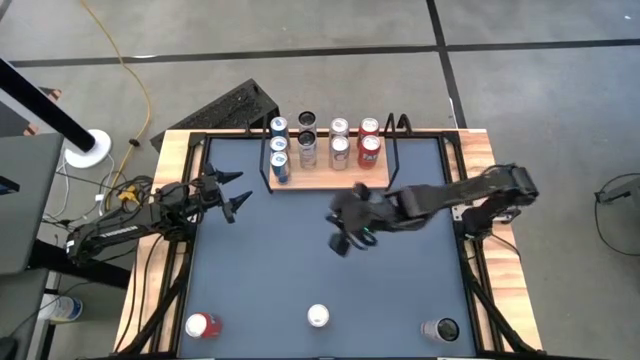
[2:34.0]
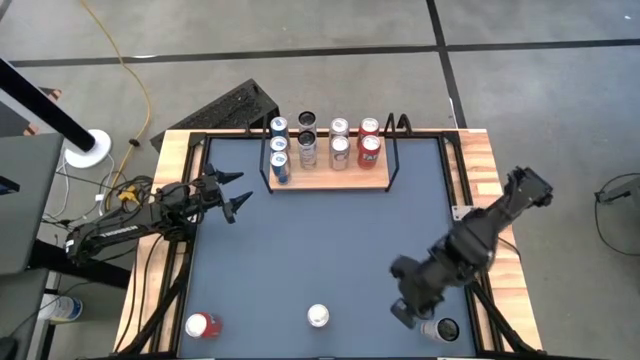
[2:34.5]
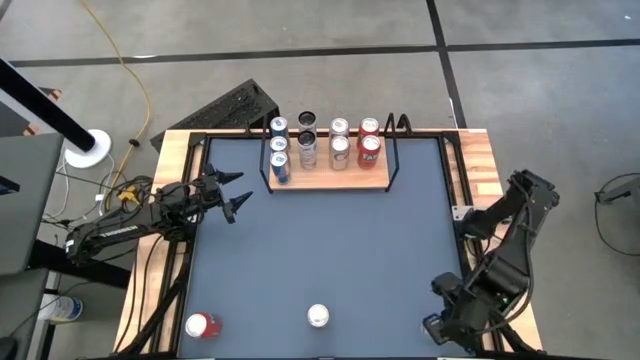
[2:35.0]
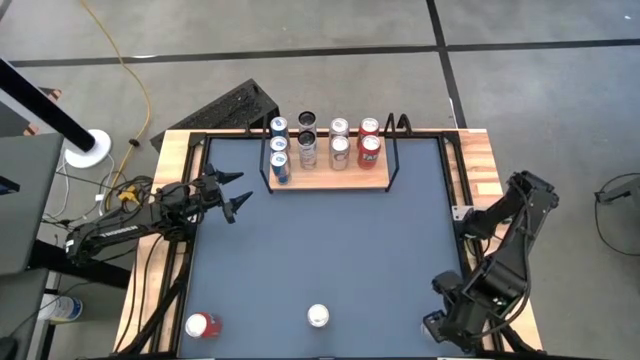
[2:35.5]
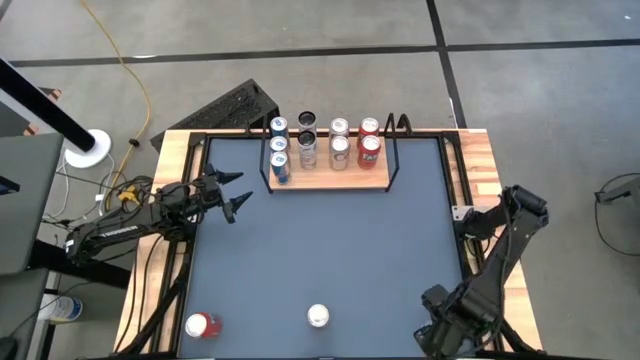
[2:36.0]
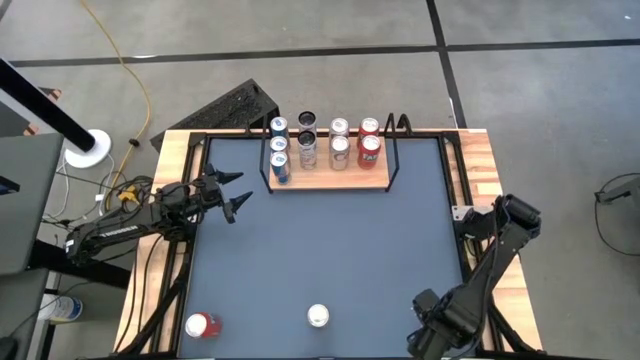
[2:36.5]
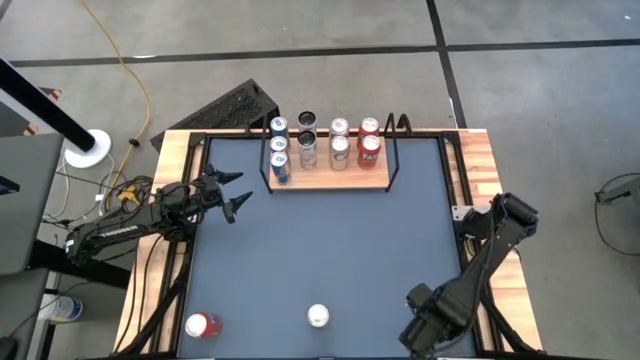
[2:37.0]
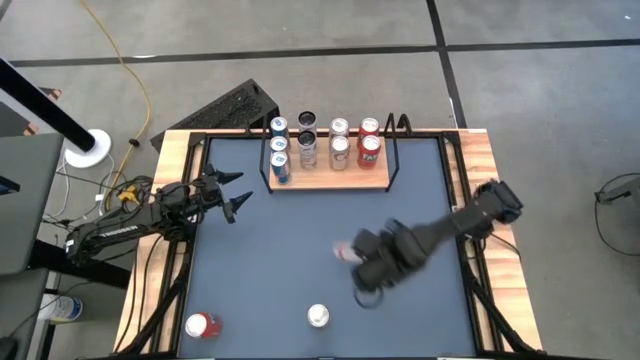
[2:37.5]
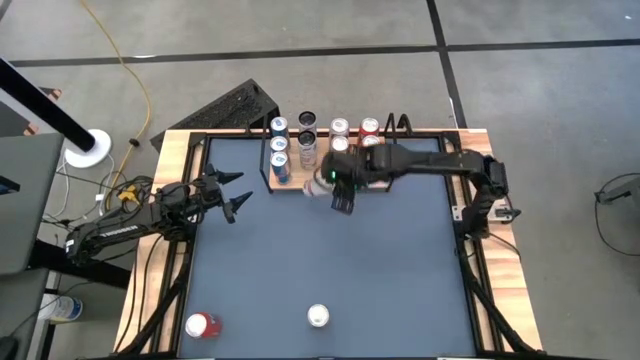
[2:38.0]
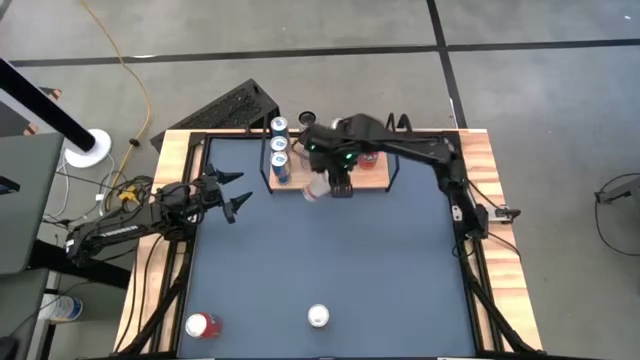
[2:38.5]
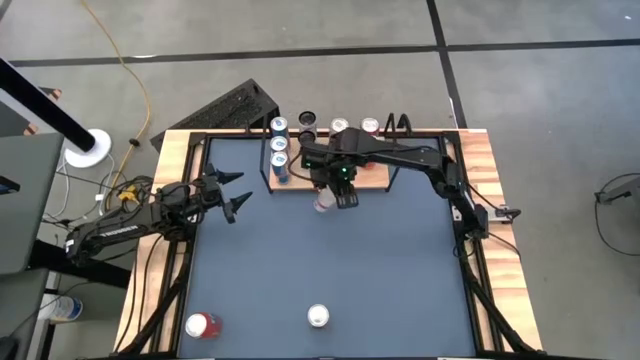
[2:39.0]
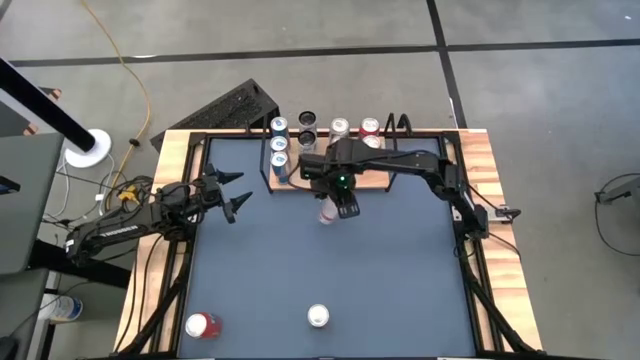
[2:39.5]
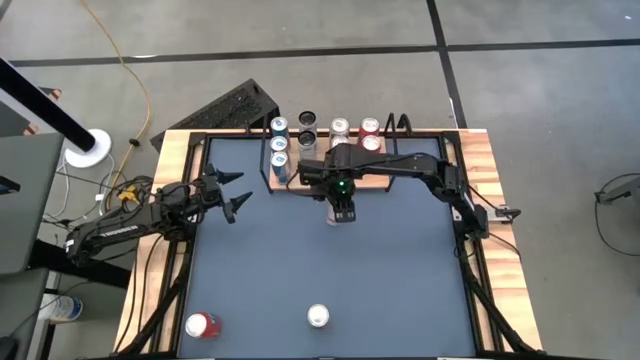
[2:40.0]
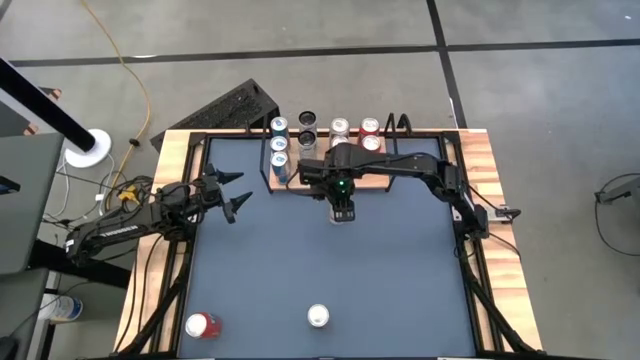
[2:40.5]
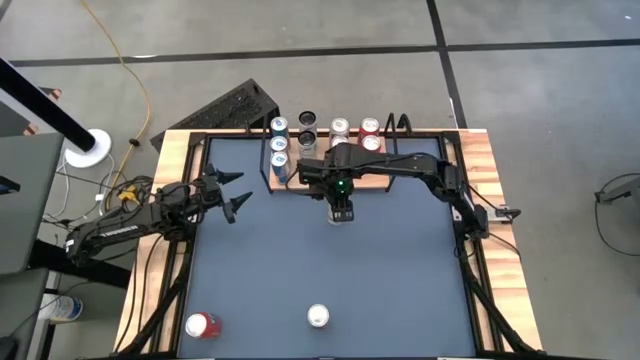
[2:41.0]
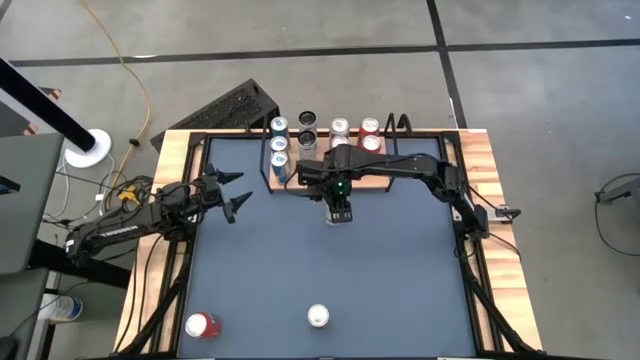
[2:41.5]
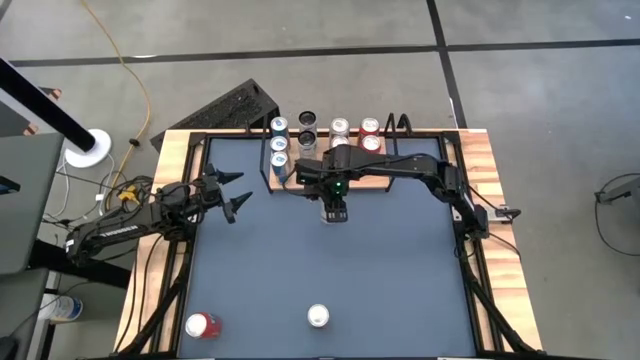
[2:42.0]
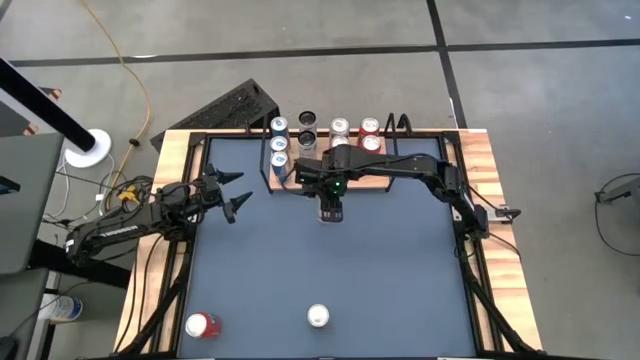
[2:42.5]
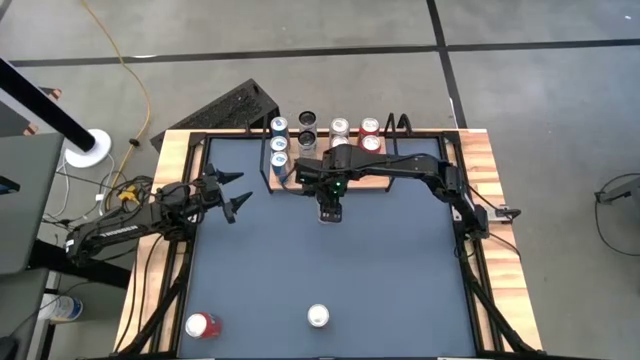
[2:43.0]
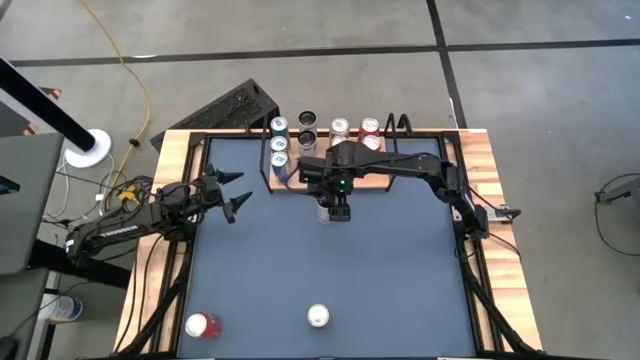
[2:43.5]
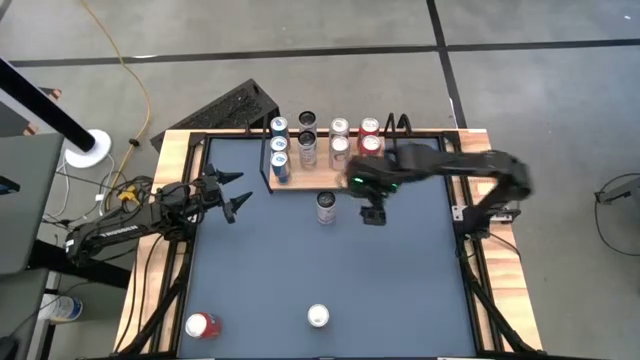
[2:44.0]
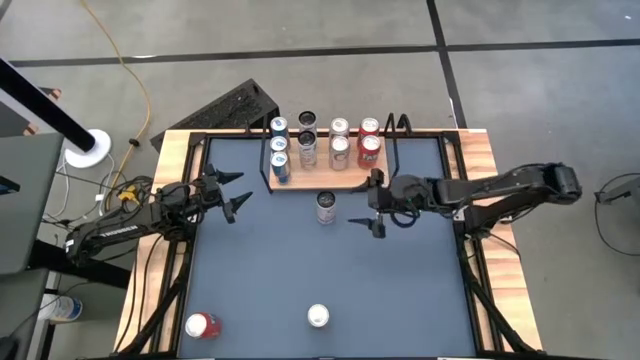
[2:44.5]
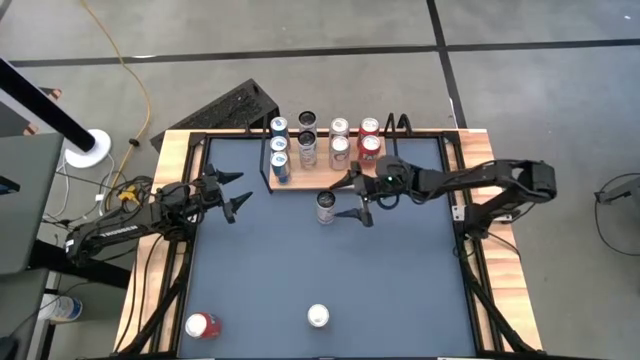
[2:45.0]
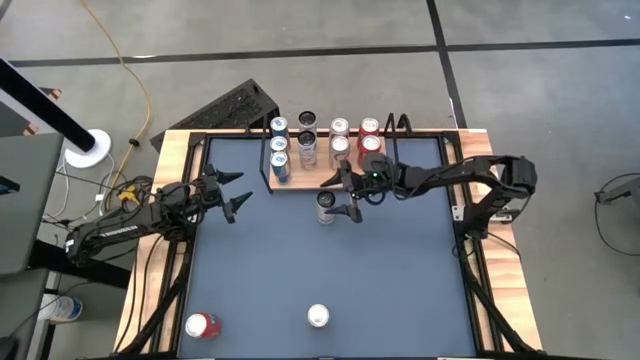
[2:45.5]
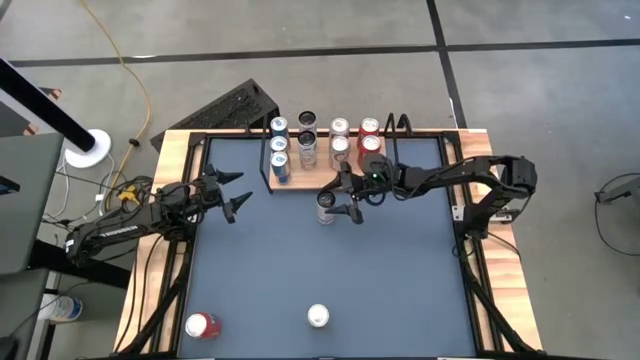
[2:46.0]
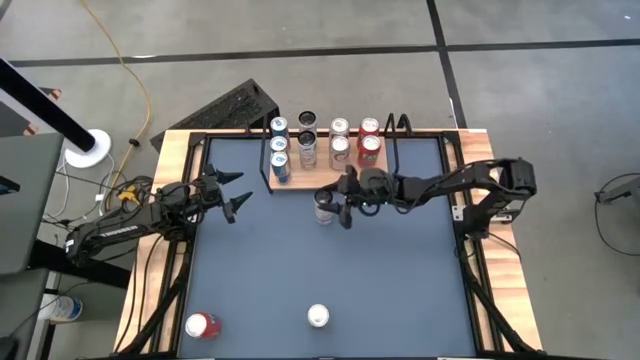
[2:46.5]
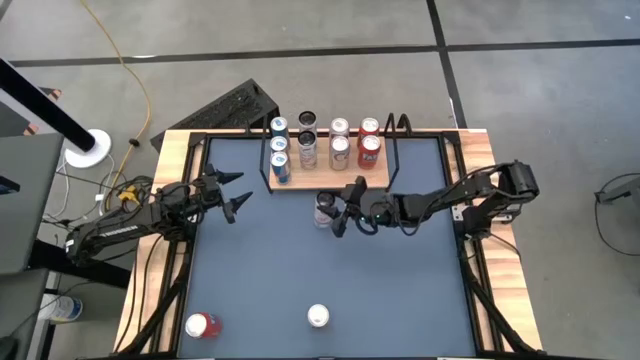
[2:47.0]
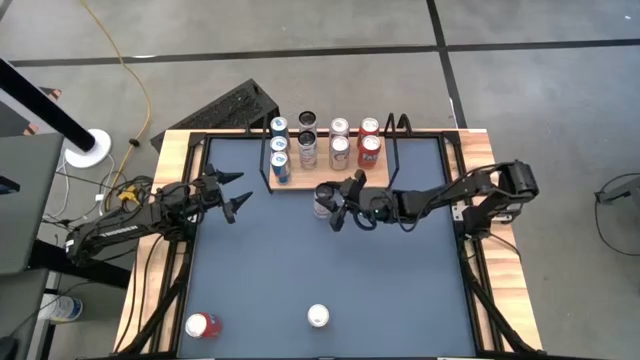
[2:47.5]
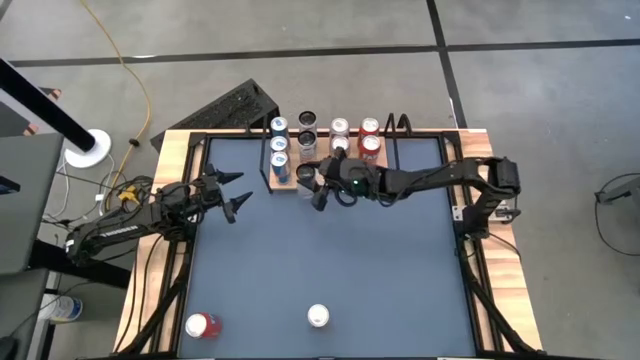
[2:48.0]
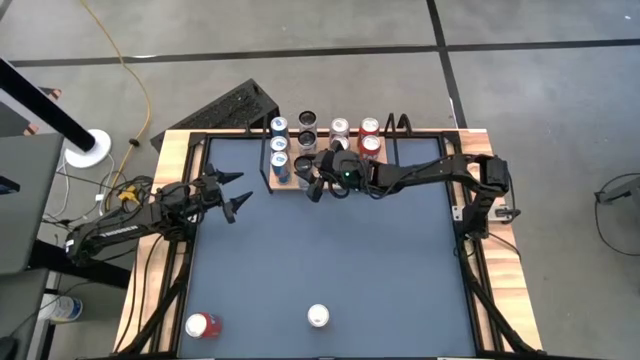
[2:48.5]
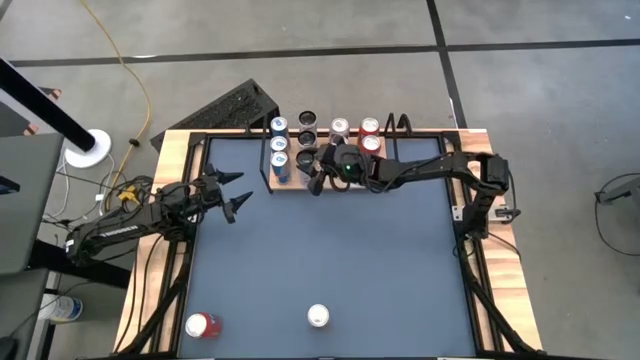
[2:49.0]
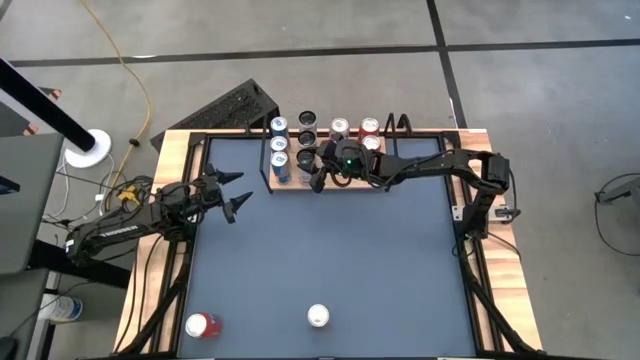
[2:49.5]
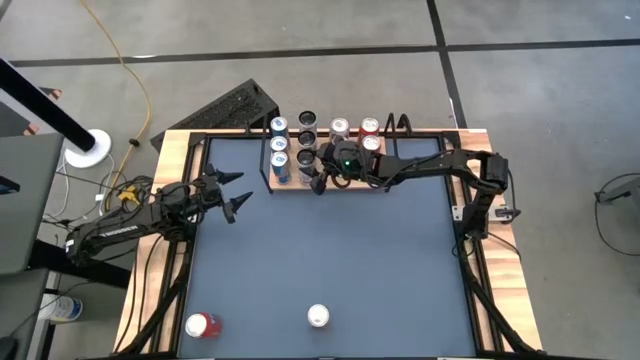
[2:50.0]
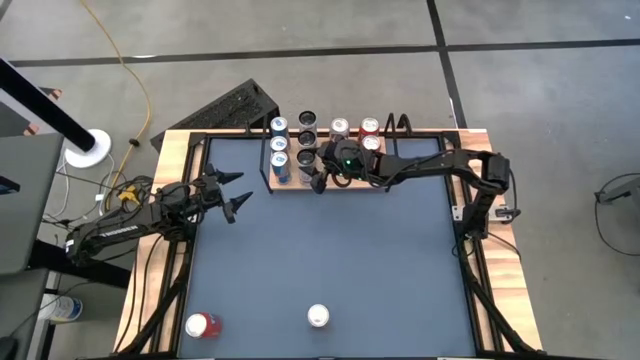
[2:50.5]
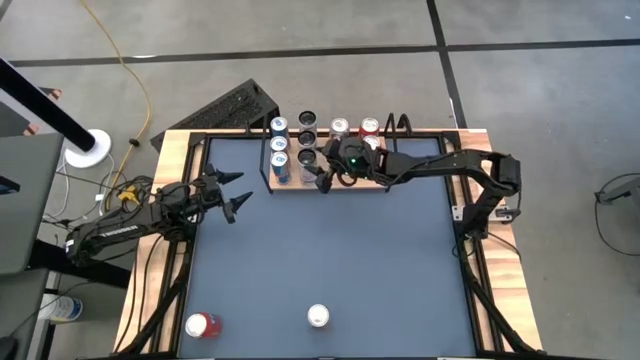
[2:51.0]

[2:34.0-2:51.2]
Task: Place canned beverage on shelf
Put the pink and white soda can onto the shelf aligned with the other pink and white soda cans

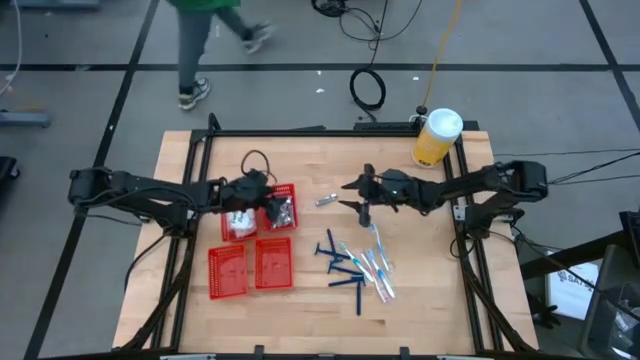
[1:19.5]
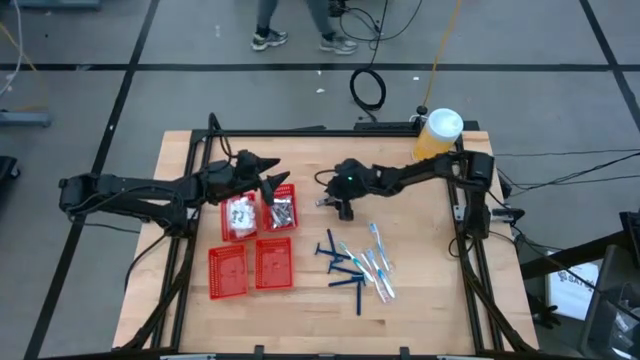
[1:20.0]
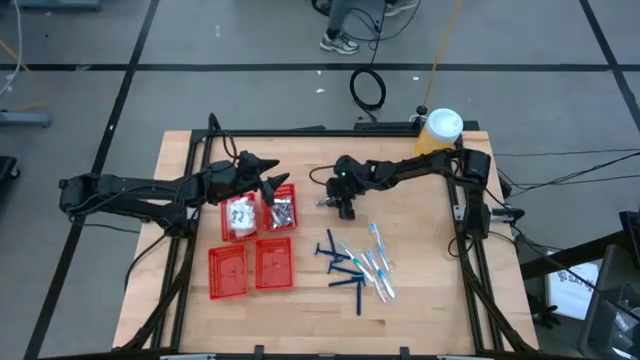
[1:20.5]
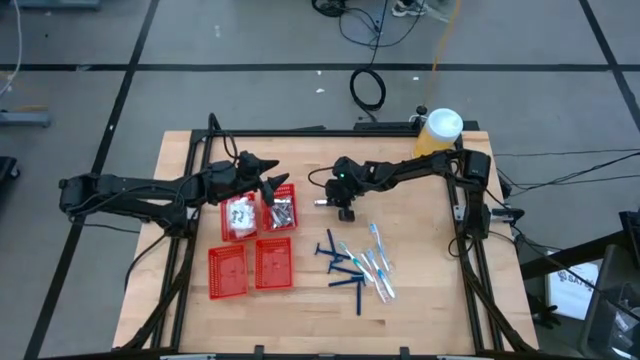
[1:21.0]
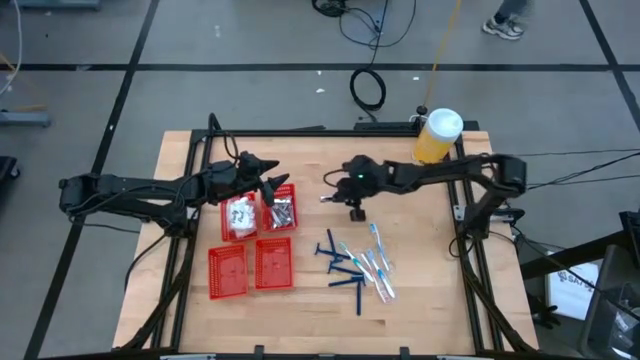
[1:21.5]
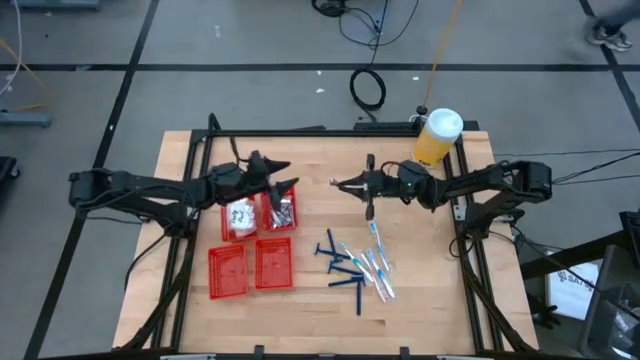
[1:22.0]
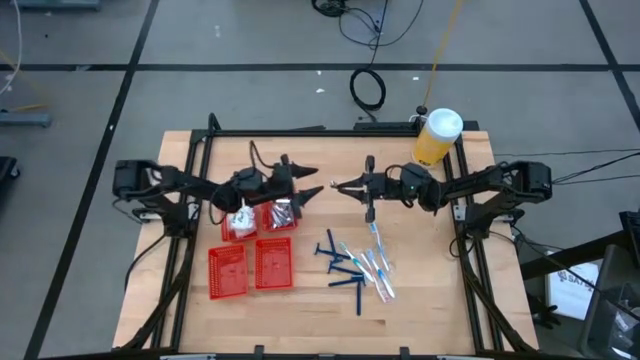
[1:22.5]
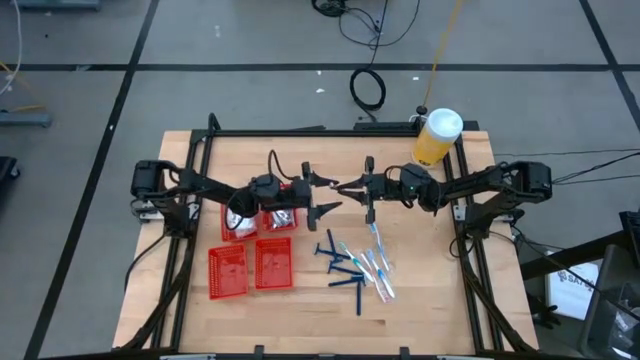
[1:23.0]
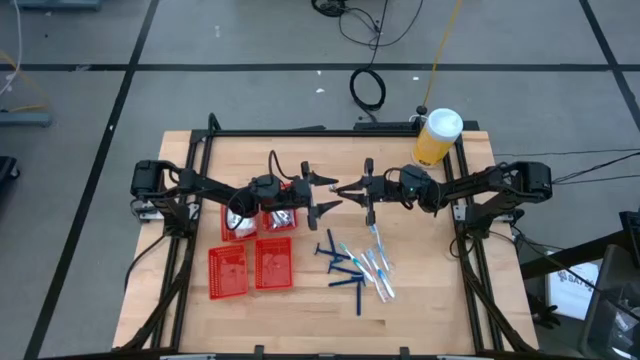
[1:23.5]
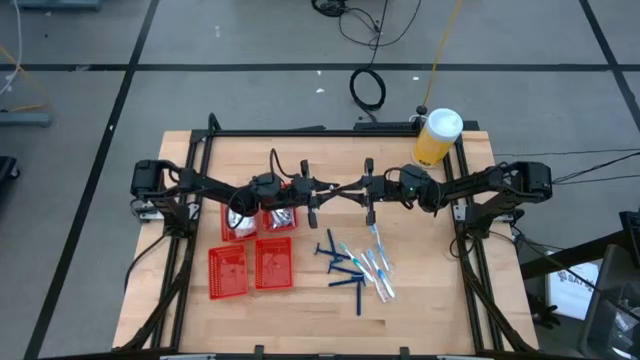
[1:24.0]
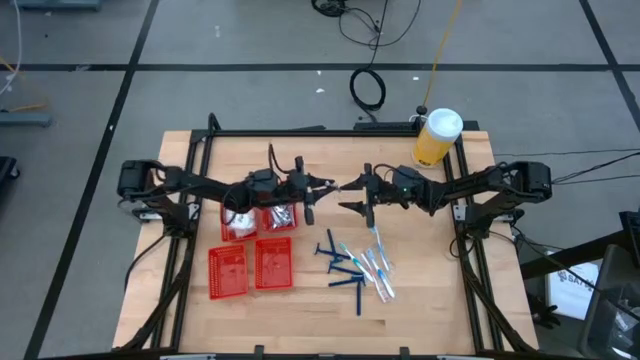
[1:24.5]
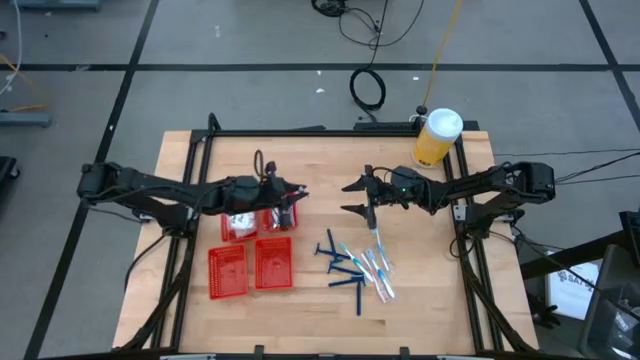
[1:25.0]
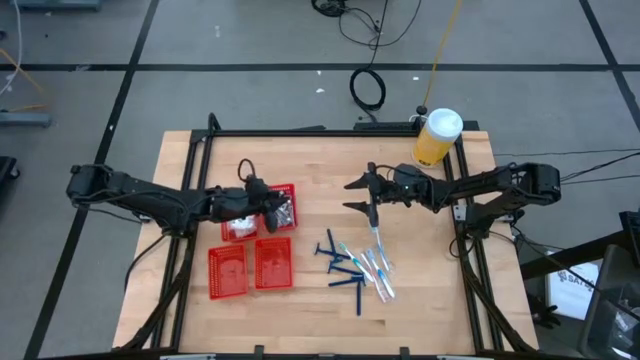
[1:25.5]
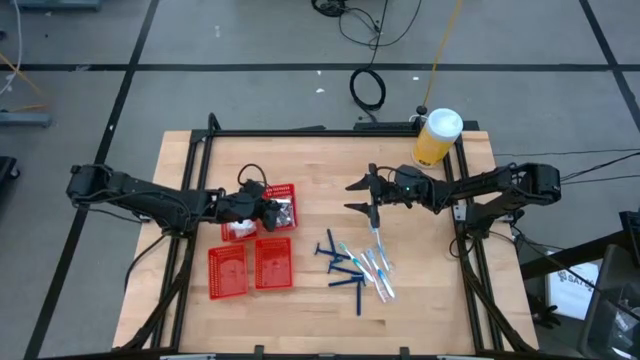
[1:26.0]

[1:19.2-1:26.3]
Task: Pick & Place Travel size toiletries
Put the silver nail cutter into the top right red basket
